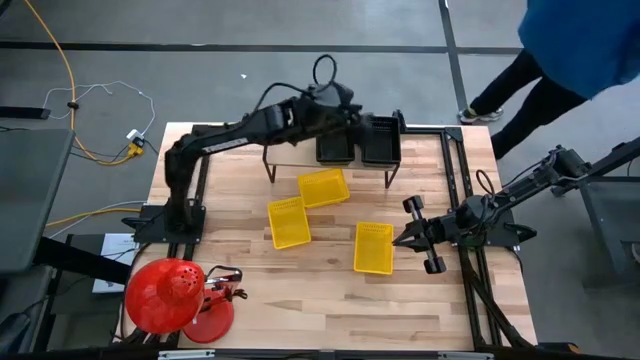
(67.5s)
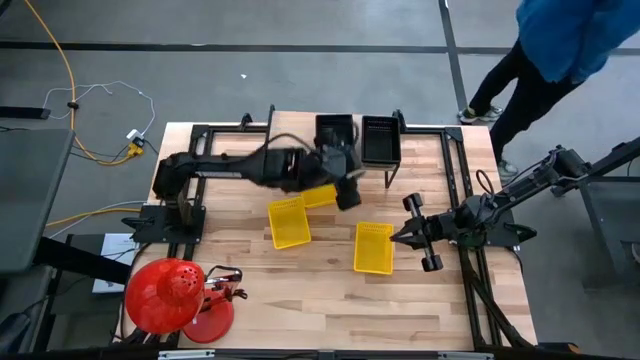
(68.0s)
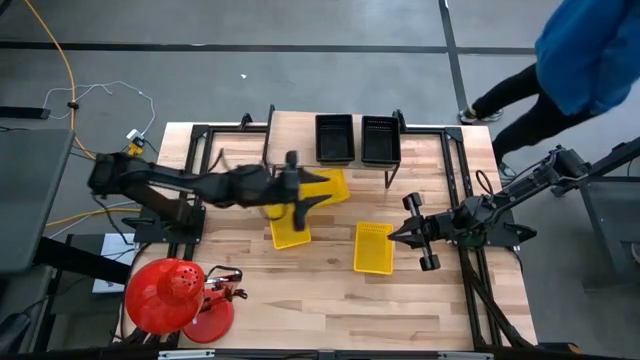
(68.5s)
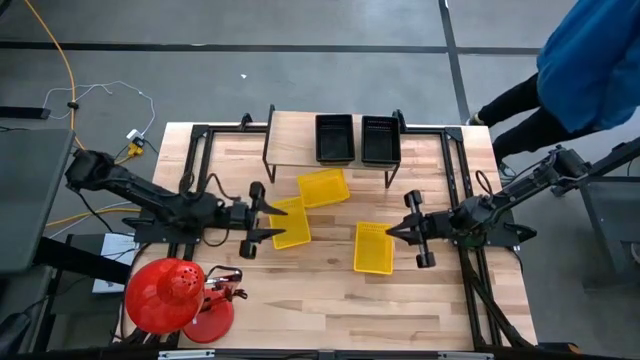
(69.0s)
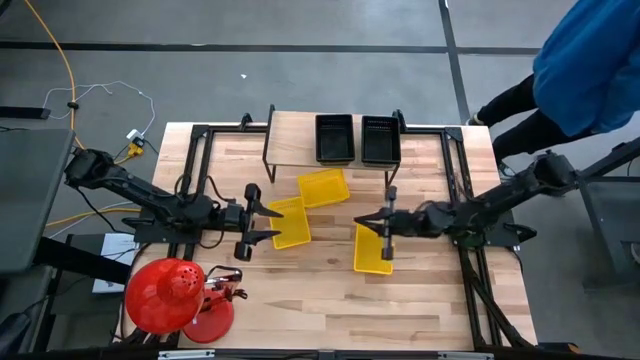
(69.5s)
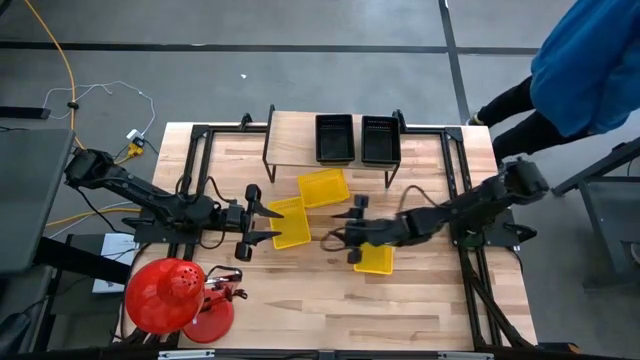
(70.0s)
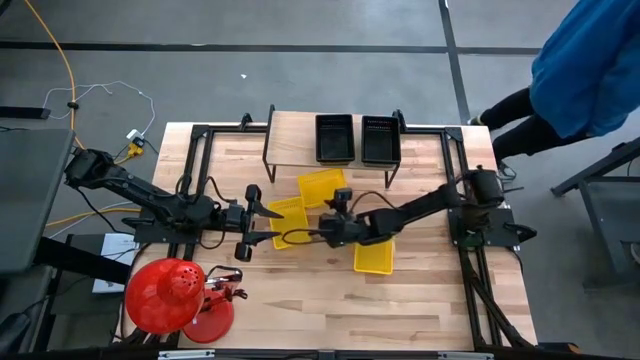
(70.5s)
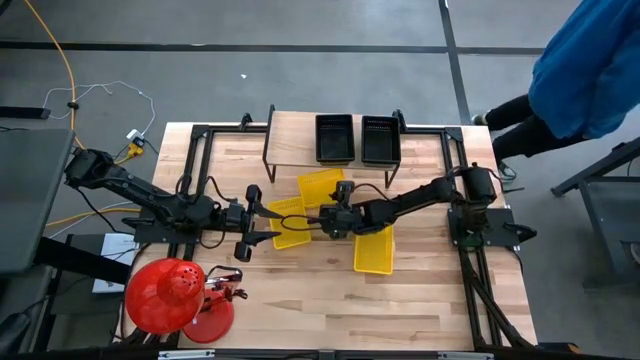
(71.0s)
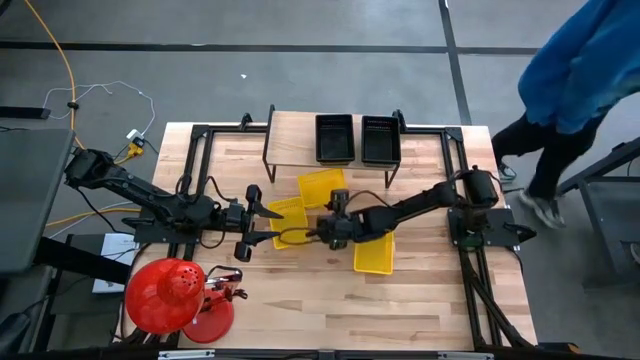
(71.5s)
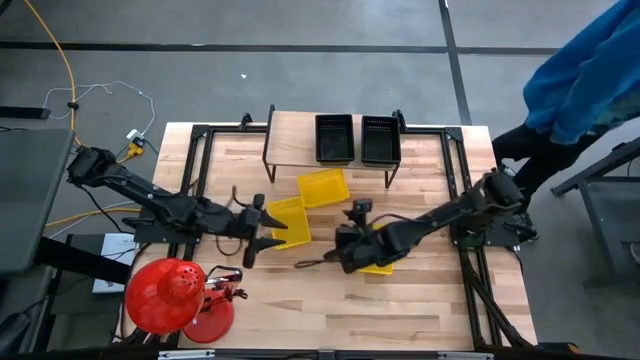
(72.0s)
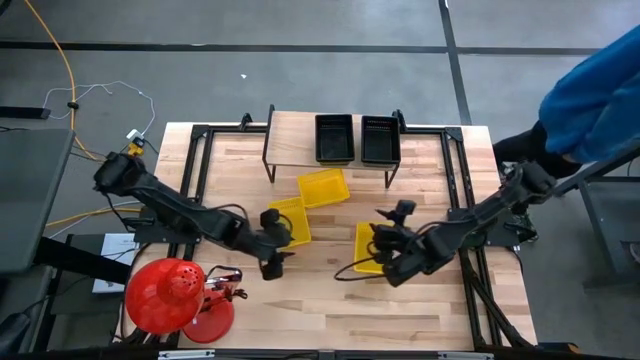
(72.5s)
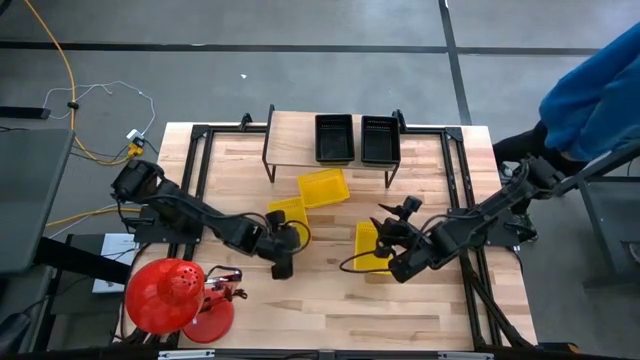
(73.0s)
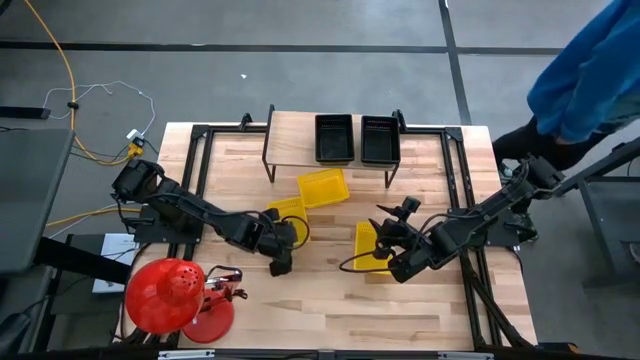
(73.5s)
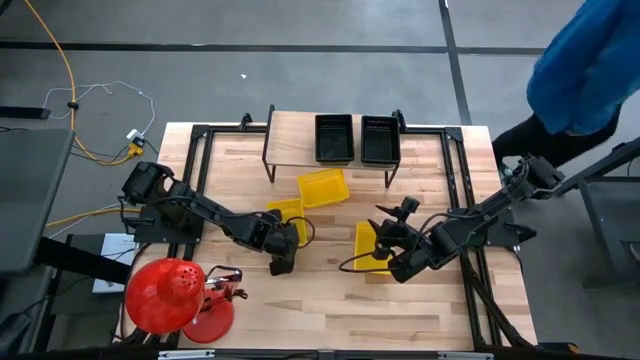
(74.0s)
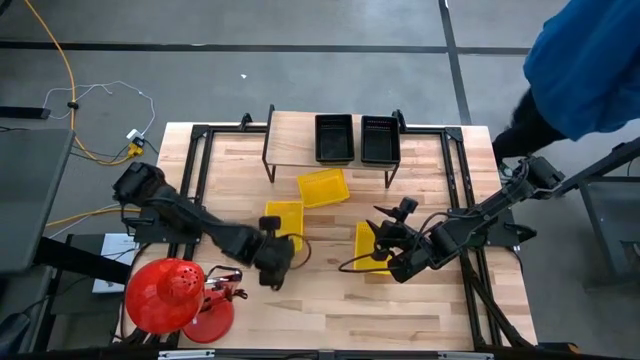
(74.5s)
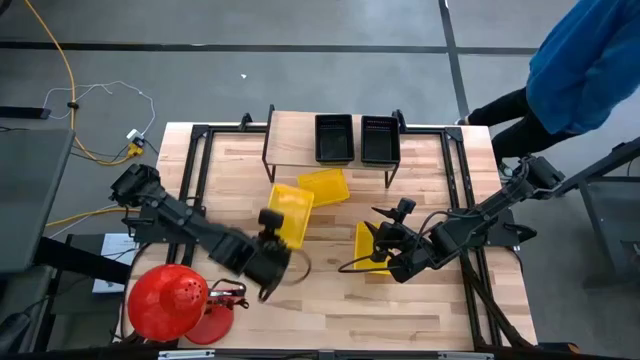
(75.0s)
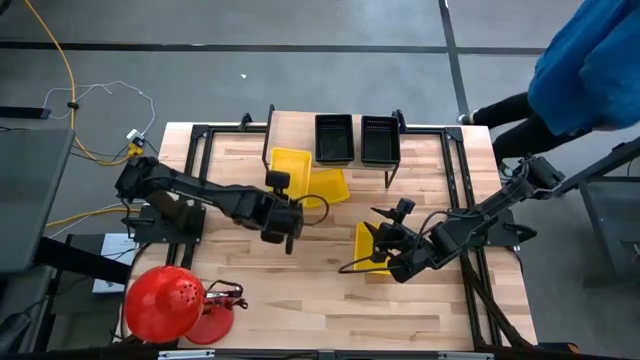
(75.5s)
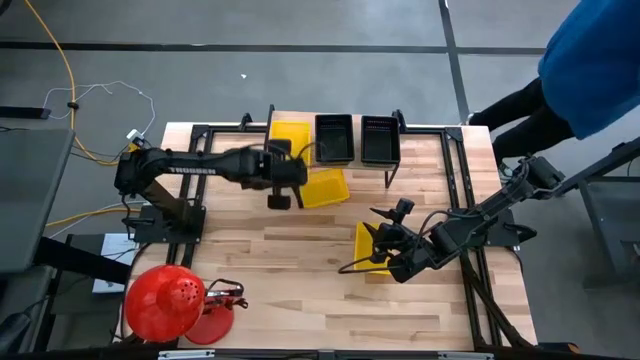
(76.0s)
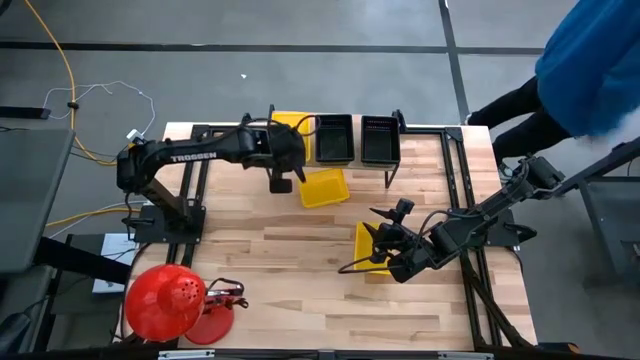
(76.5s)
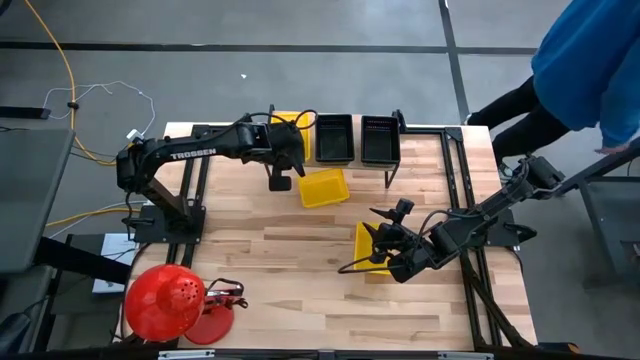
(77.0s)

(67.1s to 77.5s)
Task: Stack baskets on shelf by color
Put the yellow bin on the shelf

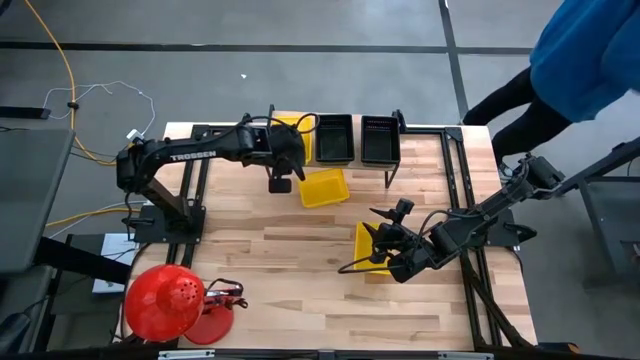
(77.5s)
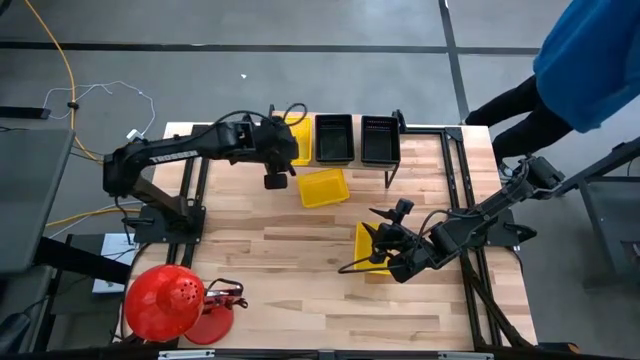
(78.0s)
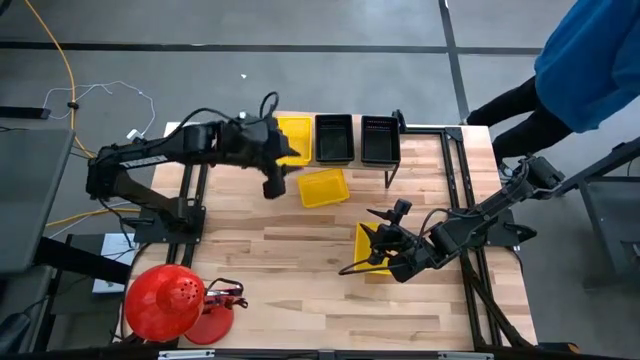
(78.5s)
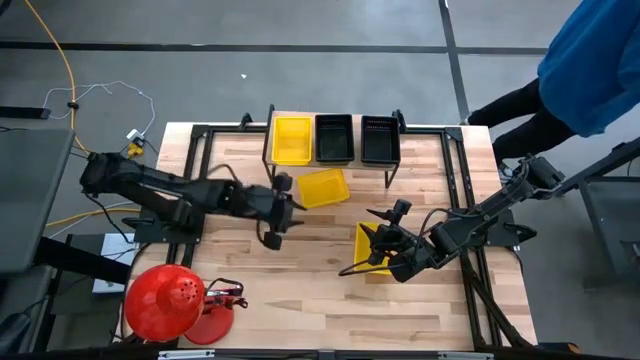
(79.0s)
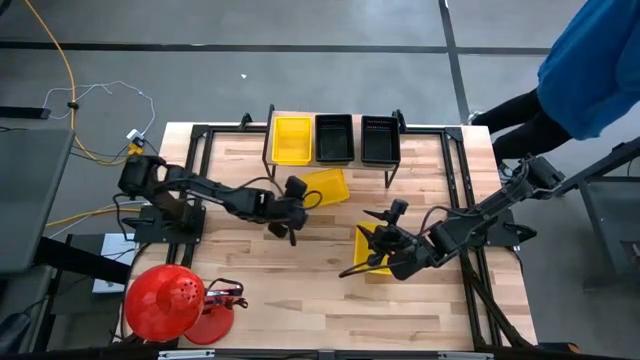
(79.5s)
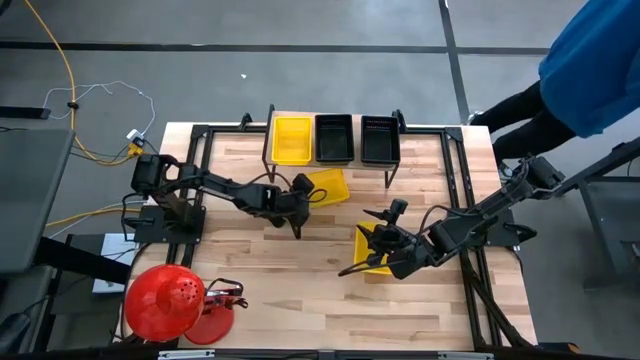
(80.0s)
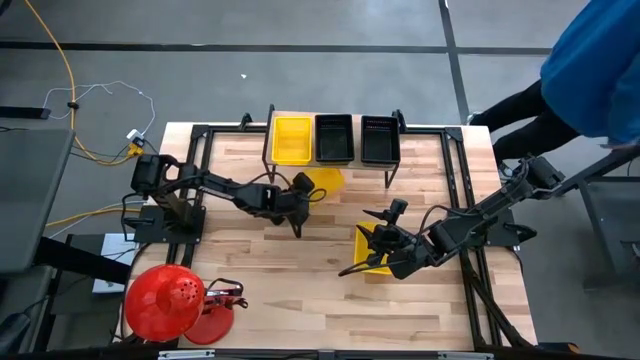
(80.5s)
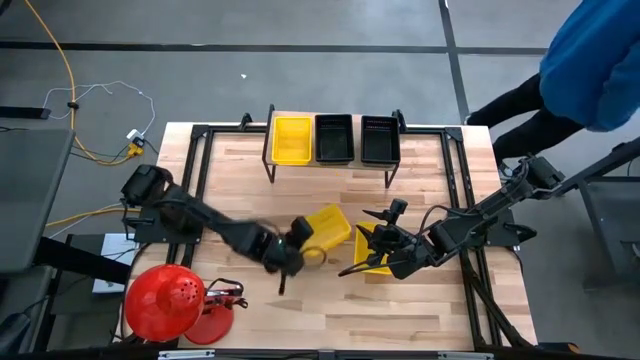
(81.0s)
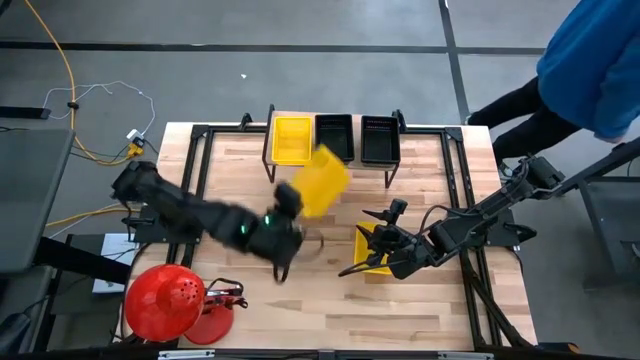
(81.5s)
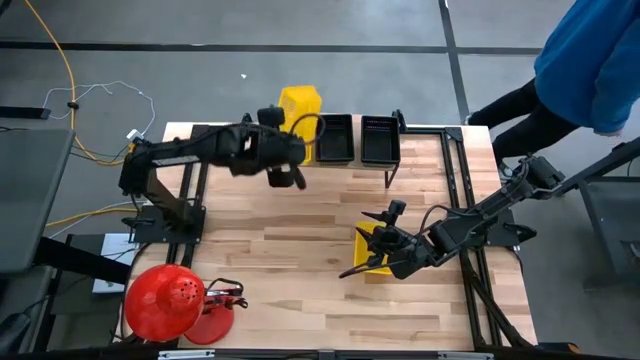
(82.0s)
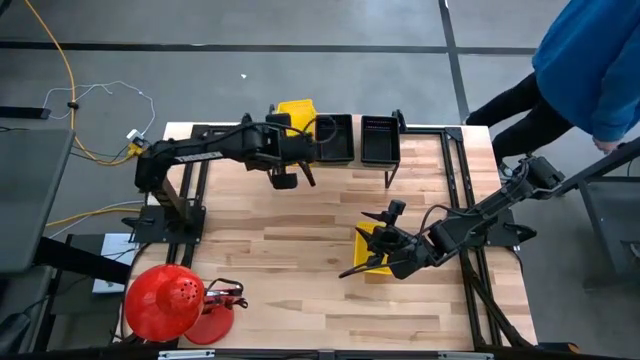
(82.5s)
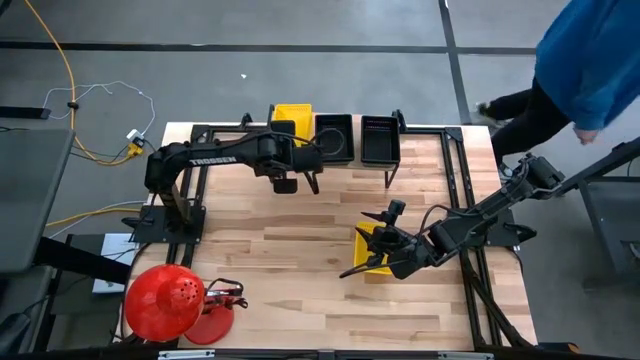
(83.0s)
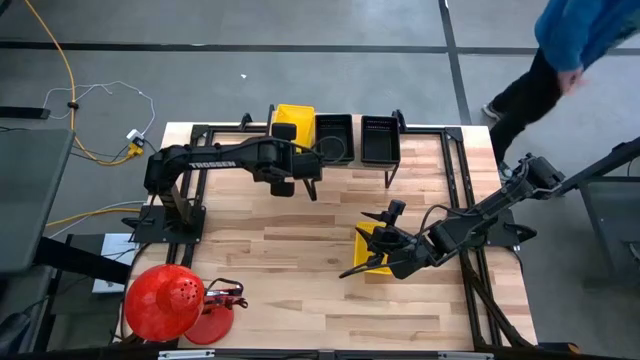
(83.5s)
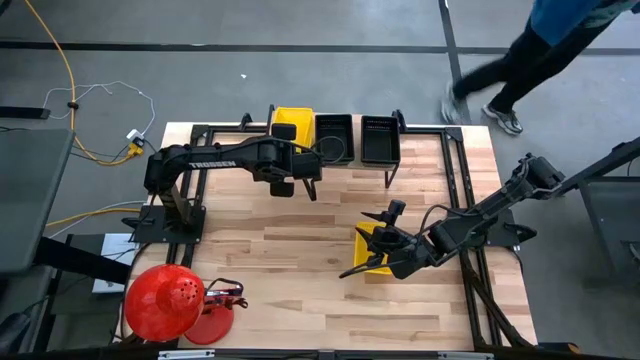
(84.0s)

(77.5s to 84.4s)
Stack the yellow bin on the yellow bin on the shelf

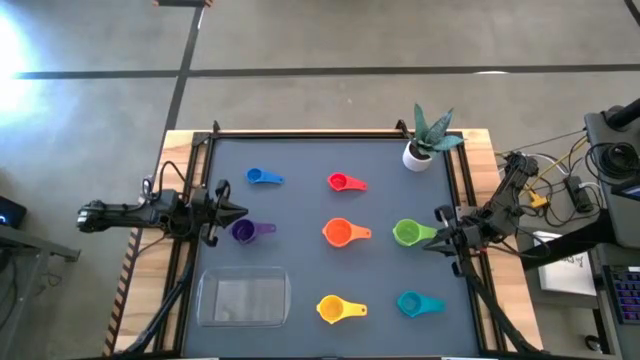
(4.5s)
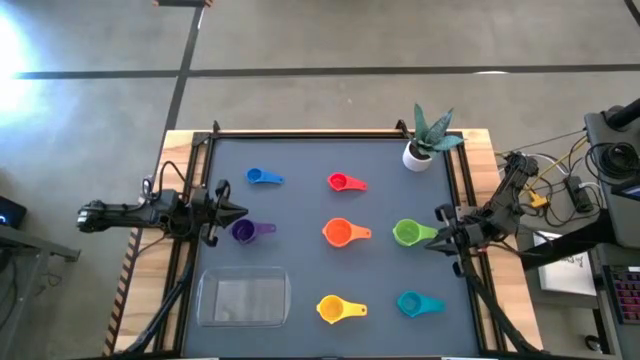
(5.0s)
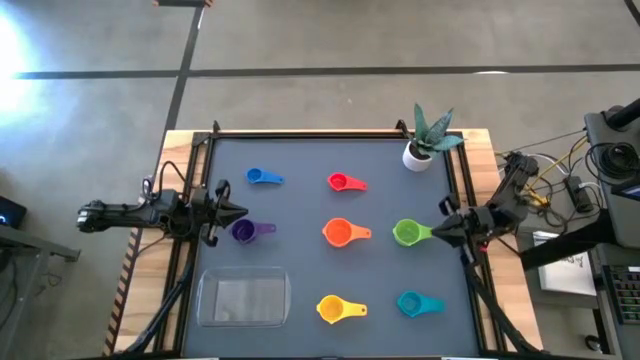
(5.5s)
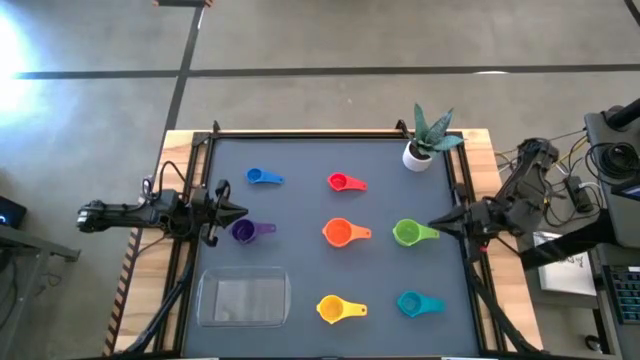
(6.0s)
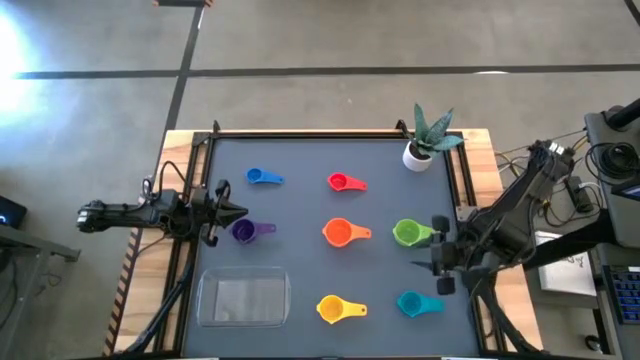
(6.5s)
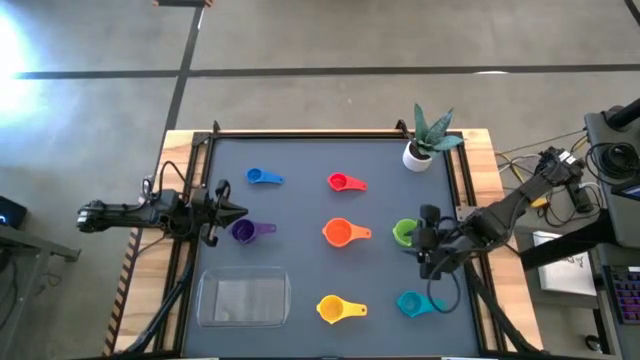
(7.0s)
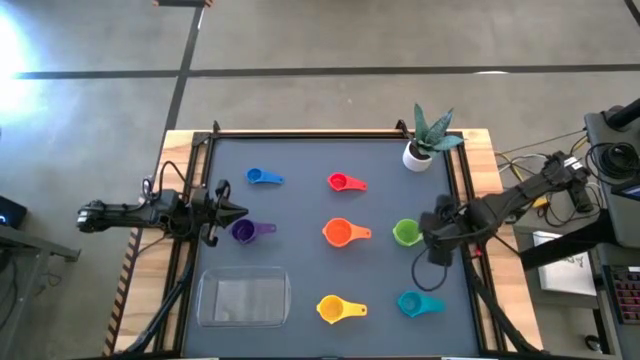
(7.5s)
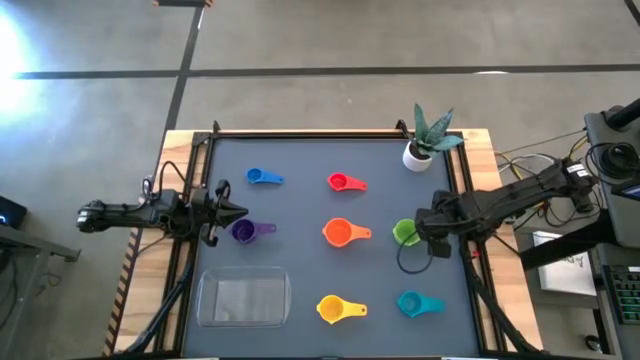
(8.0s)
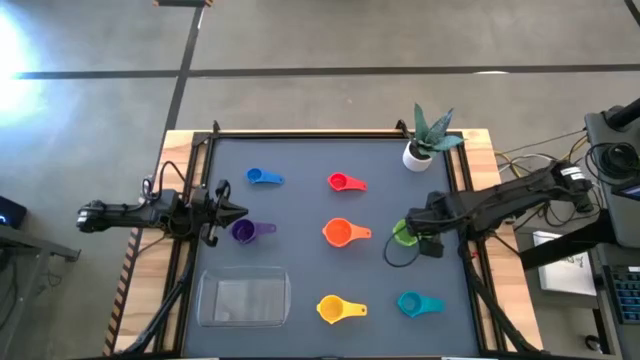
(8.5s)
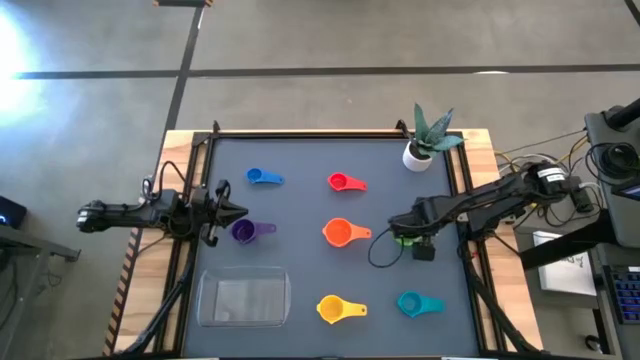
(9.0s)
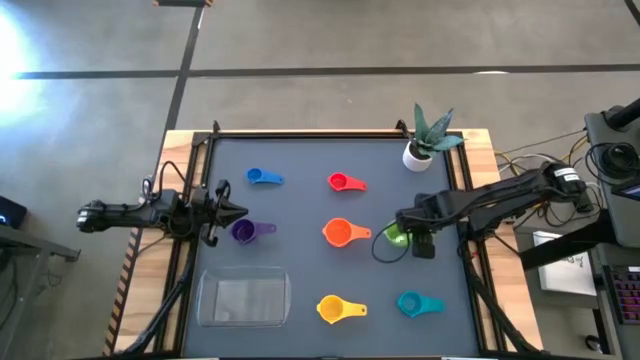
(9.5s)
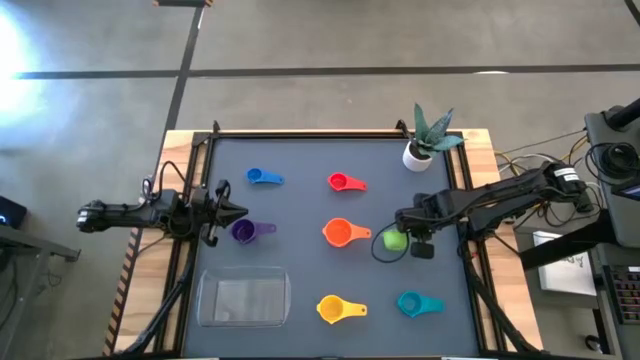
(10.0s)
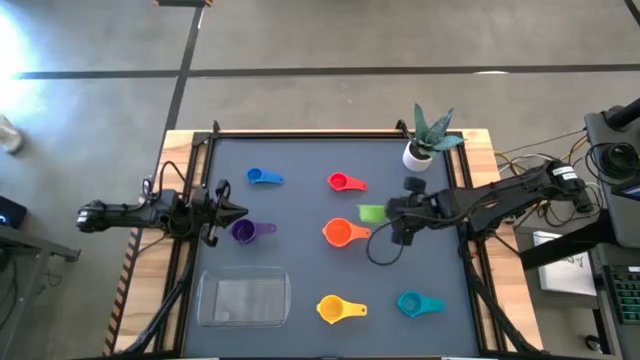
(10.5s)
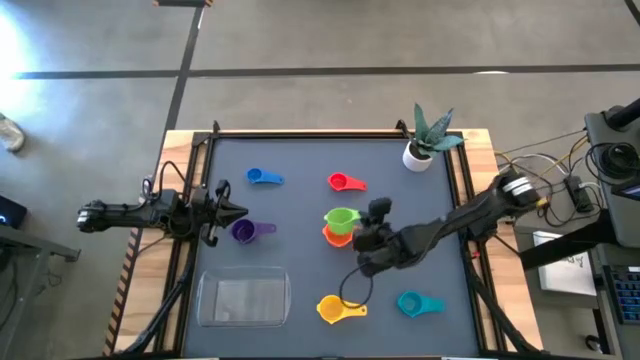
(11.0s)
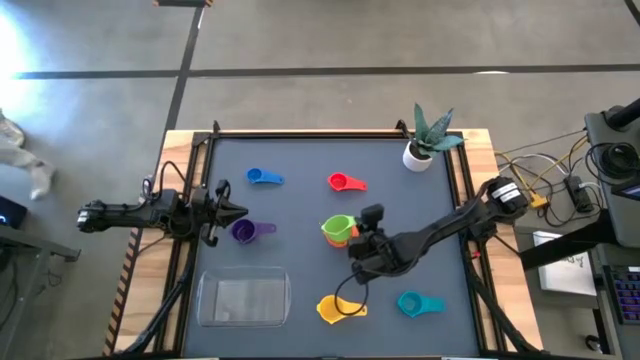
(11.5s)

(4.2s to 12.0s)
Task: Nest measuring cups in basket
Stack the green measuring cup on top of the orange measuring cup
